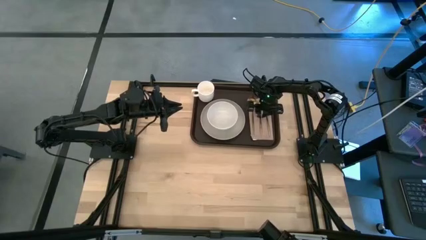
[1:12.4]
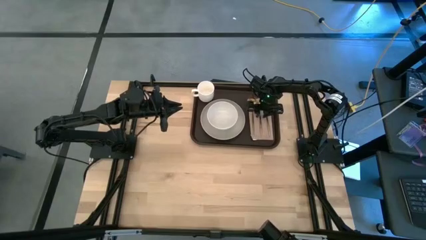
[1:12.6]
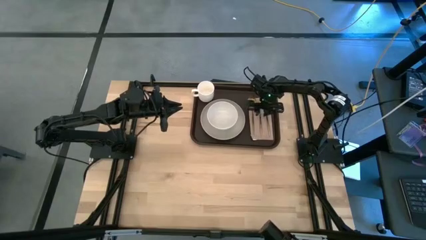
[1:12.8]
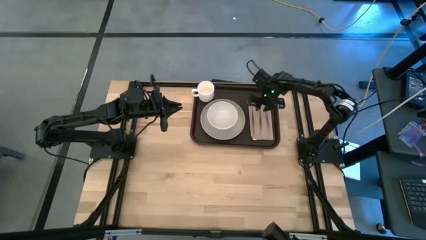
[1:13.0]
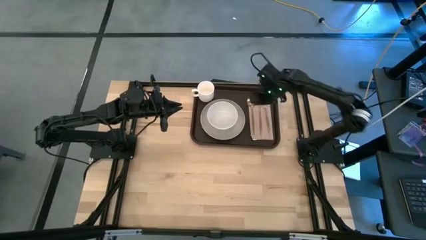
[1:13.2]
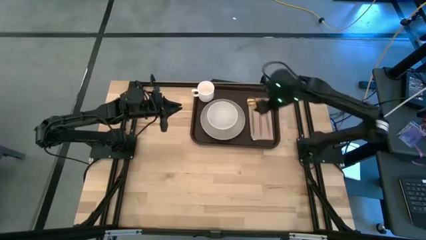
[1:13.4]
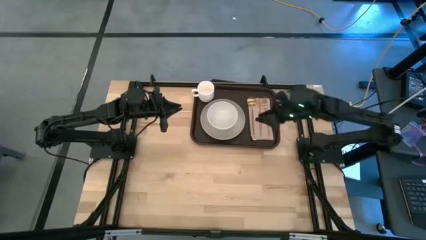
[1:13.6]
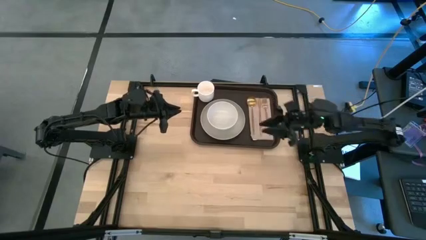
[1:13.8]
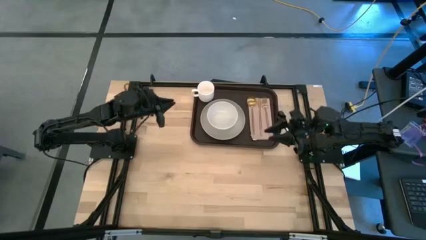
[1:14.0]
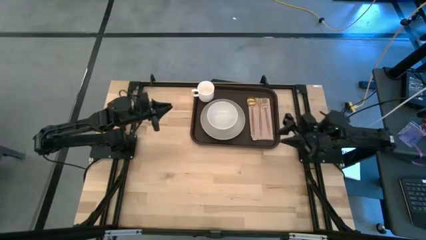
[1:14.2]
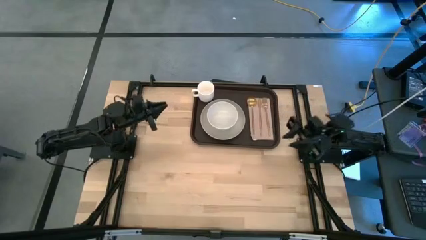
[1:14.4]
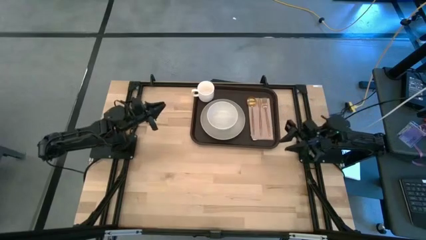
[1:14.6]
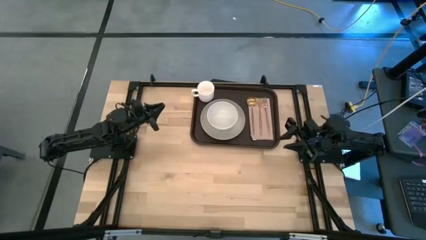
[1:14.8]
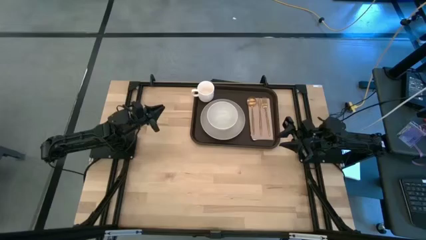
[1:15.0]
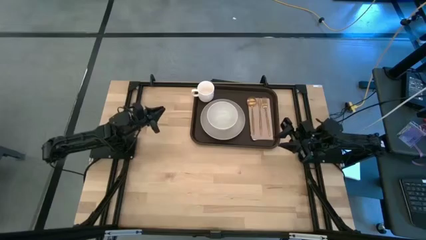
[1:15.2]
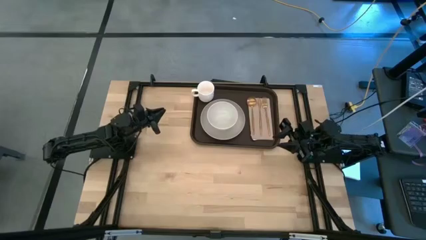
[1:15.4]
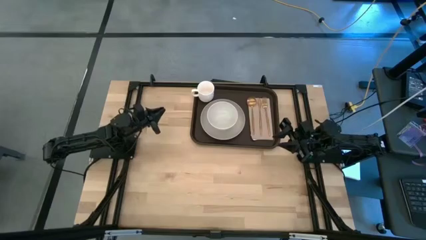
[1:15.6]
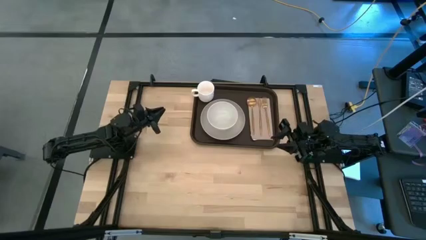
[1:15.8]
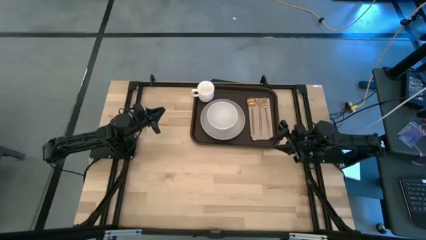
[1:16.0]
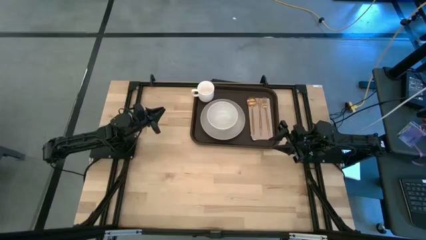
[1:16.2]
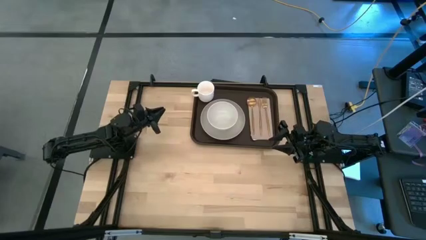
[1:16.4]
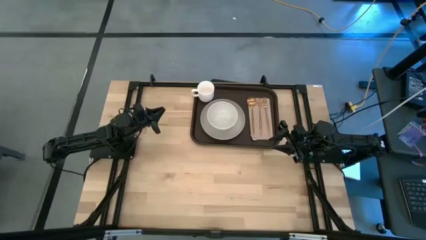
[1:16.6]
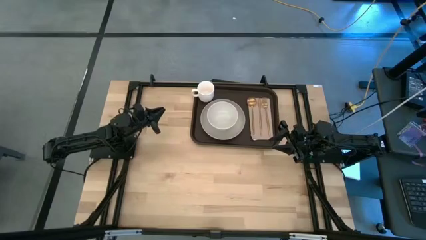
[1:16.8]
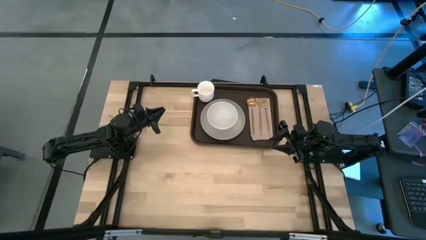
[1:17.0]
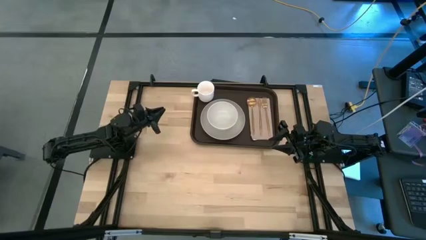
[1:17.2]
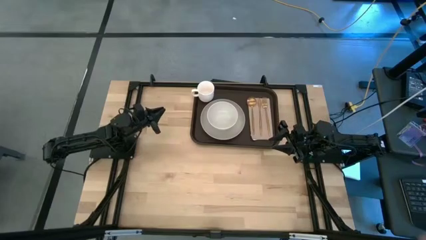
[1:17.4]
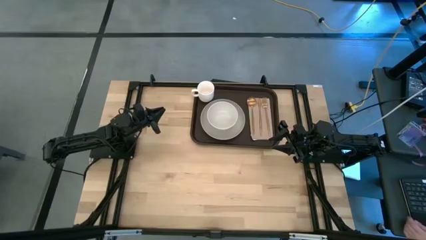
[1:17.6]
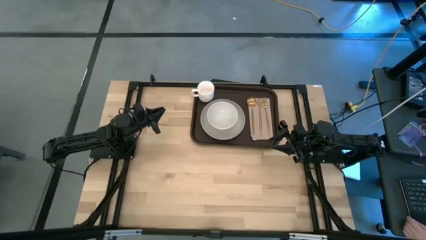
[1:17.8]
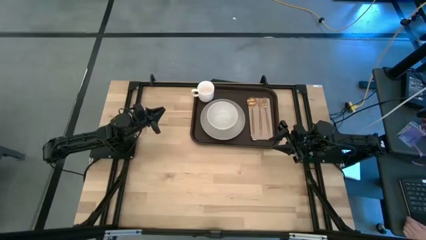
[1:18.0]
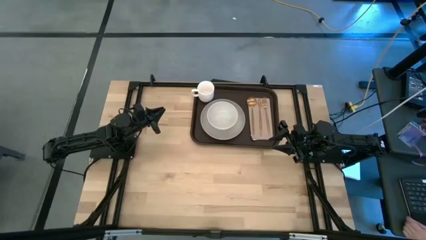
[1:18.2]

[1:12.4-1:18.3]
Task: Set up tray
Return to Home Position

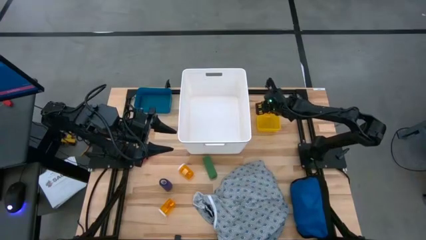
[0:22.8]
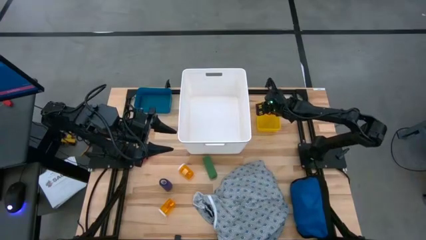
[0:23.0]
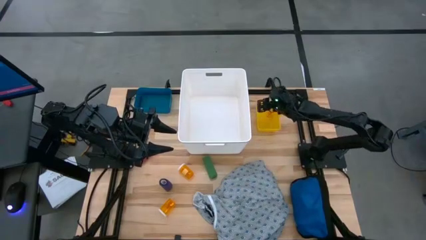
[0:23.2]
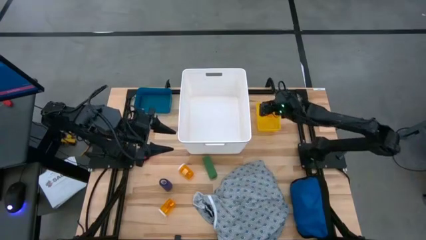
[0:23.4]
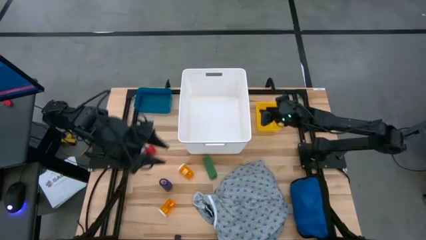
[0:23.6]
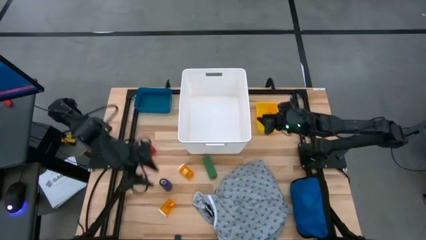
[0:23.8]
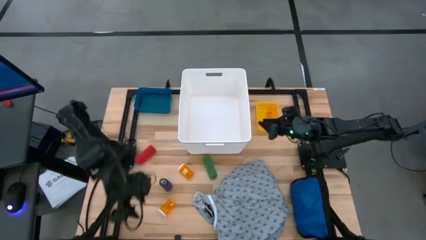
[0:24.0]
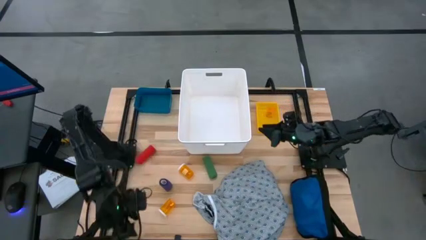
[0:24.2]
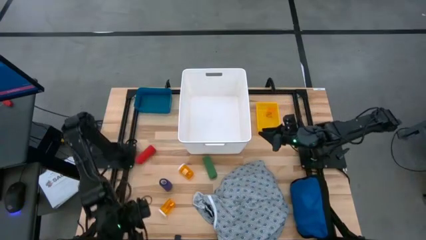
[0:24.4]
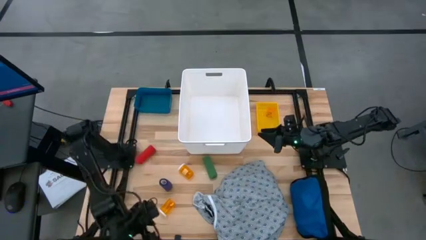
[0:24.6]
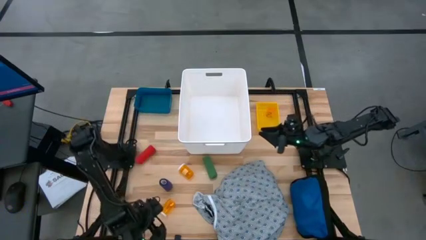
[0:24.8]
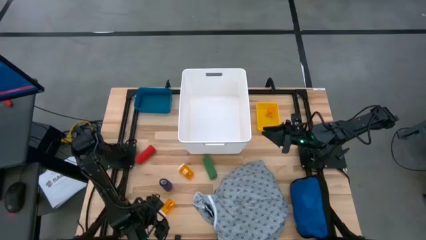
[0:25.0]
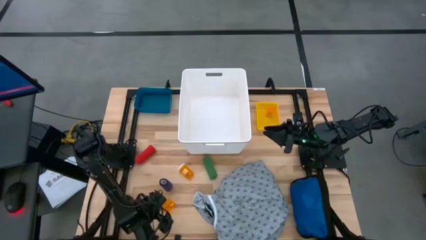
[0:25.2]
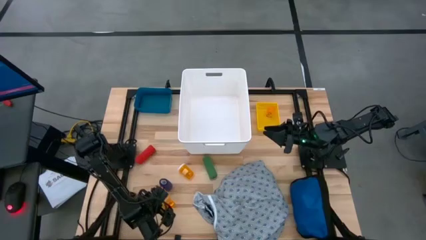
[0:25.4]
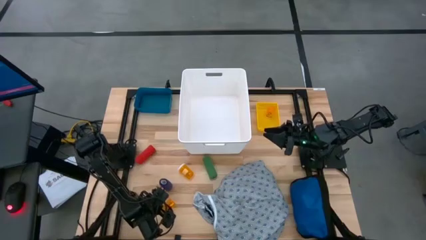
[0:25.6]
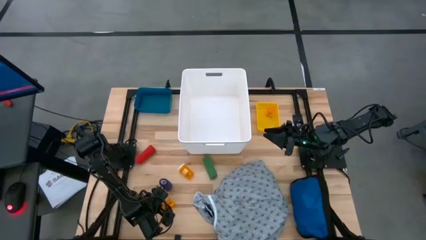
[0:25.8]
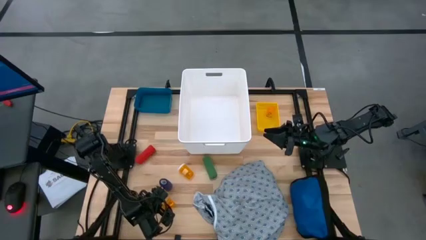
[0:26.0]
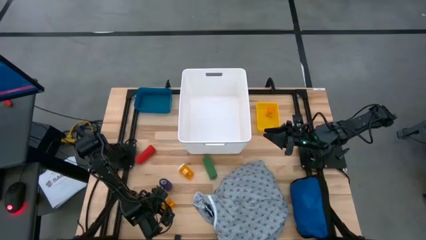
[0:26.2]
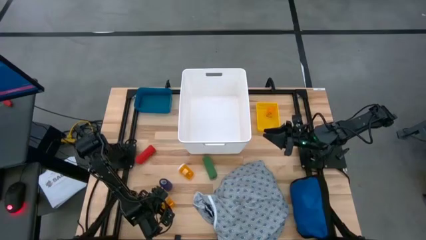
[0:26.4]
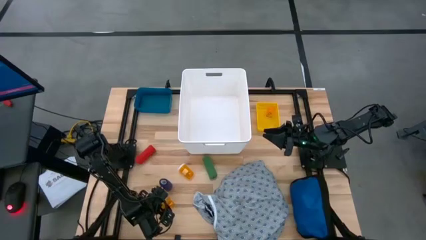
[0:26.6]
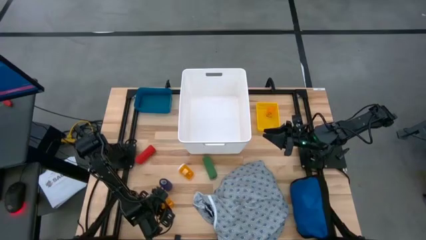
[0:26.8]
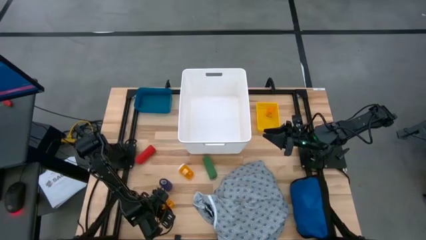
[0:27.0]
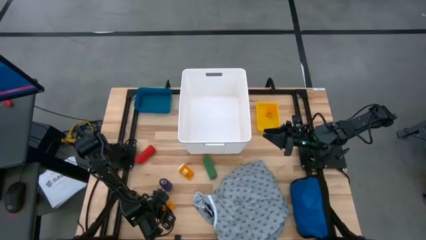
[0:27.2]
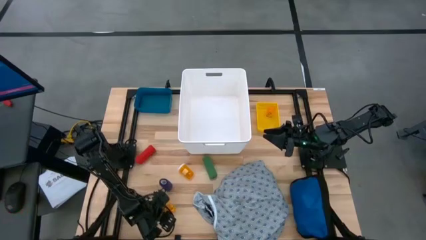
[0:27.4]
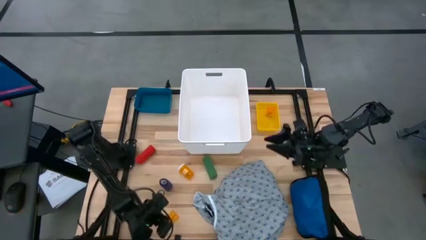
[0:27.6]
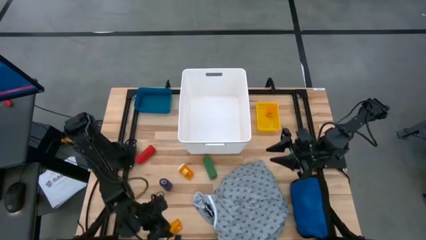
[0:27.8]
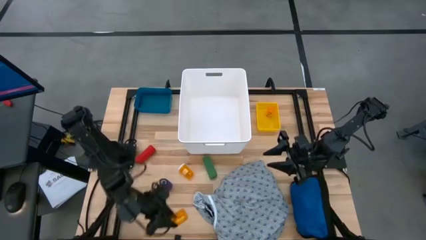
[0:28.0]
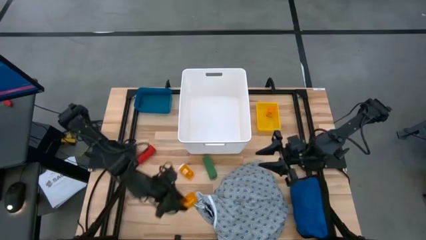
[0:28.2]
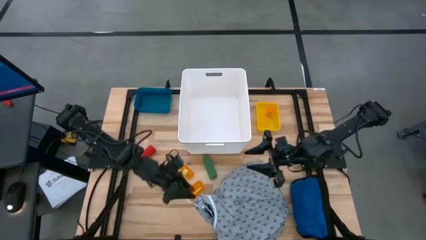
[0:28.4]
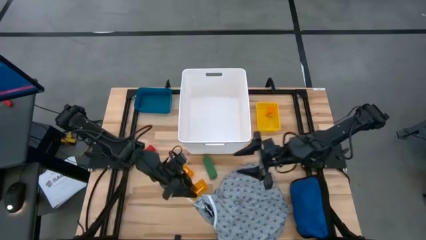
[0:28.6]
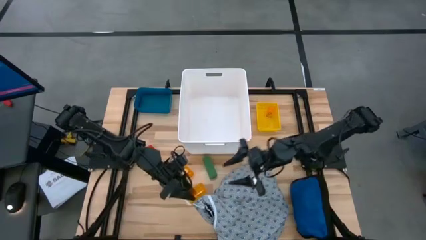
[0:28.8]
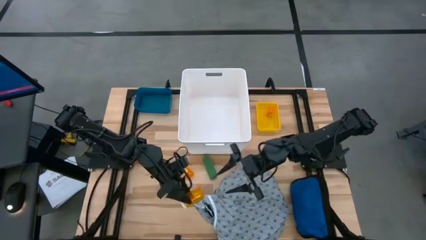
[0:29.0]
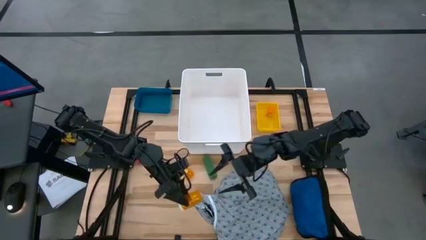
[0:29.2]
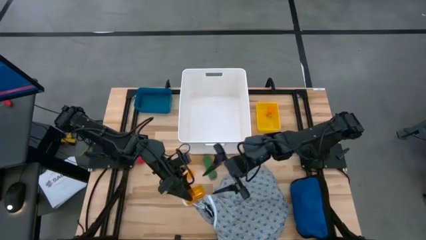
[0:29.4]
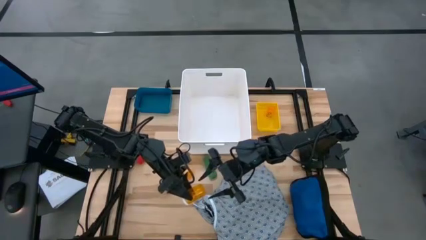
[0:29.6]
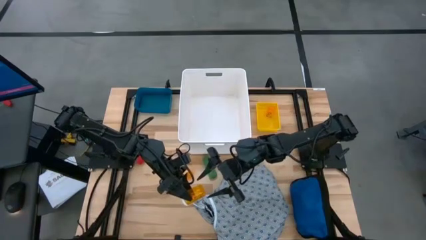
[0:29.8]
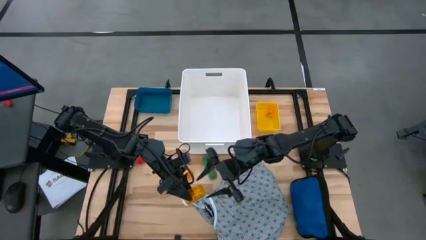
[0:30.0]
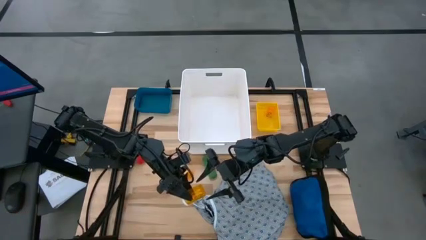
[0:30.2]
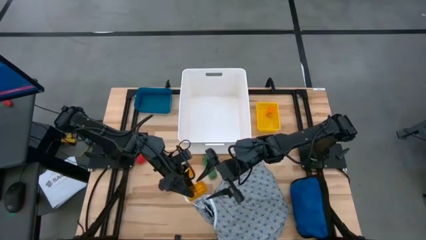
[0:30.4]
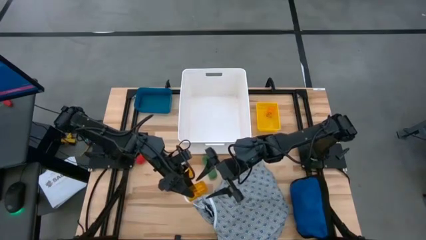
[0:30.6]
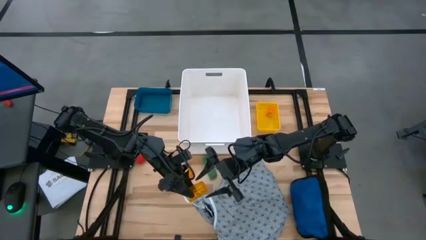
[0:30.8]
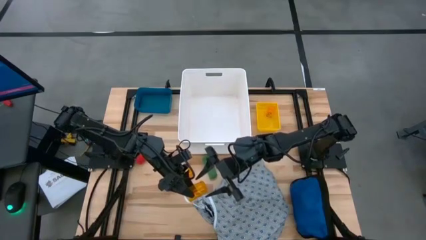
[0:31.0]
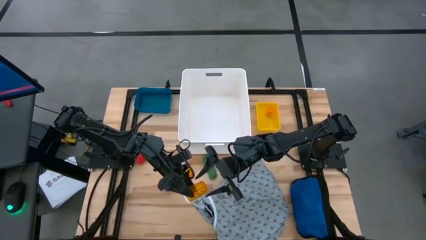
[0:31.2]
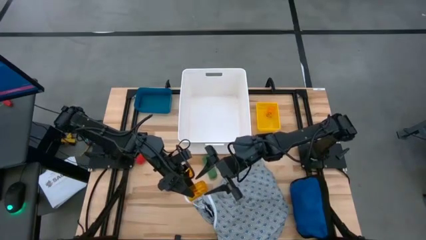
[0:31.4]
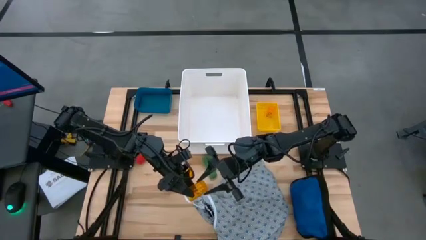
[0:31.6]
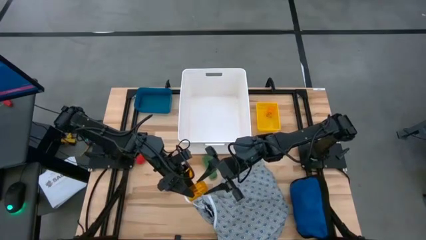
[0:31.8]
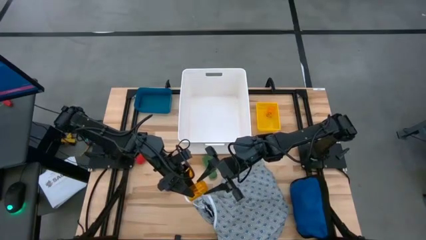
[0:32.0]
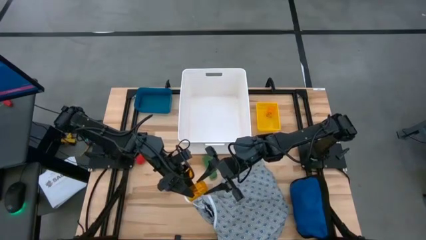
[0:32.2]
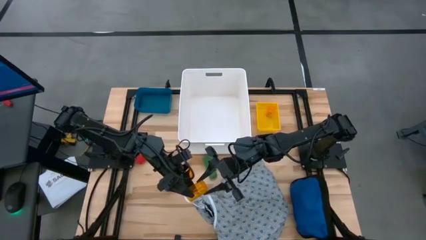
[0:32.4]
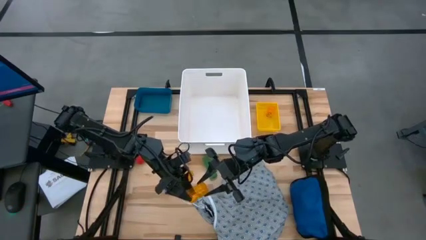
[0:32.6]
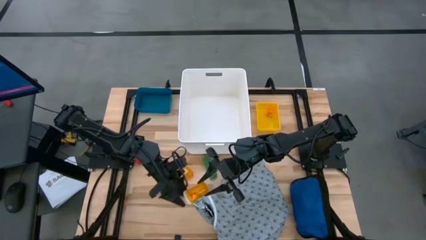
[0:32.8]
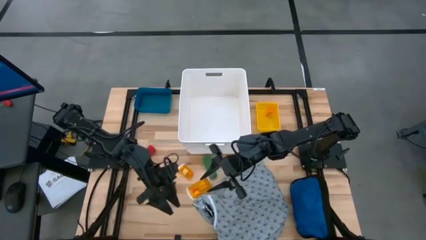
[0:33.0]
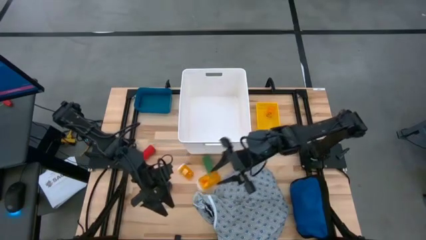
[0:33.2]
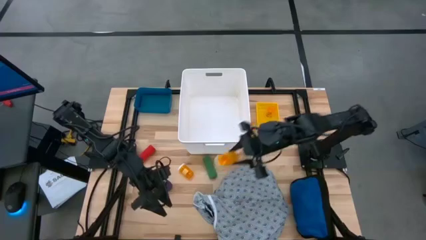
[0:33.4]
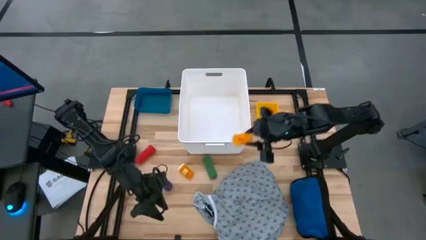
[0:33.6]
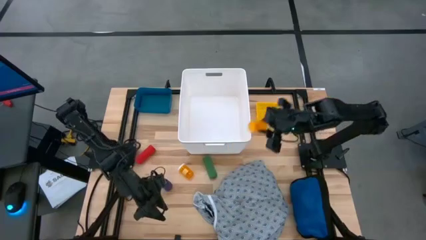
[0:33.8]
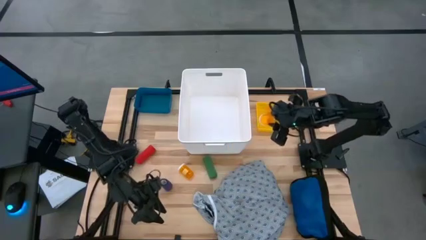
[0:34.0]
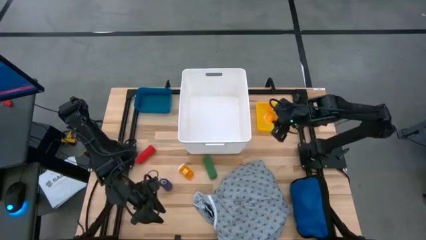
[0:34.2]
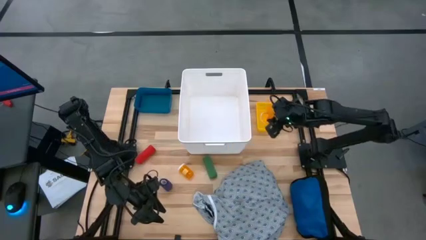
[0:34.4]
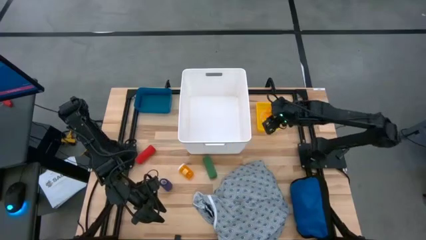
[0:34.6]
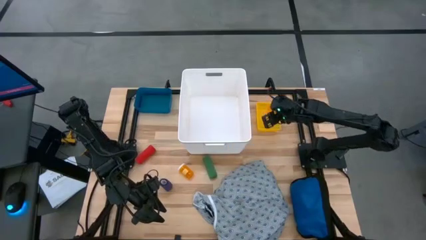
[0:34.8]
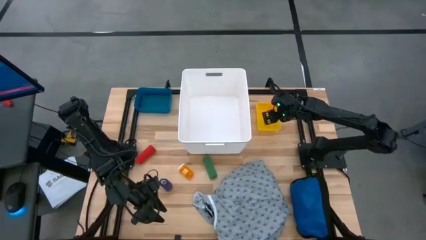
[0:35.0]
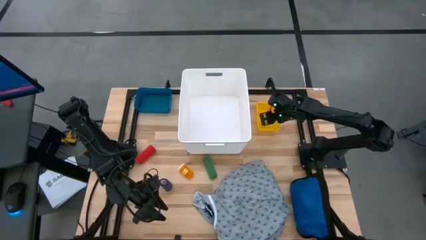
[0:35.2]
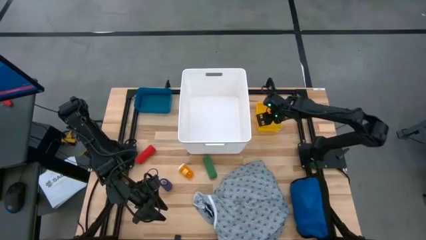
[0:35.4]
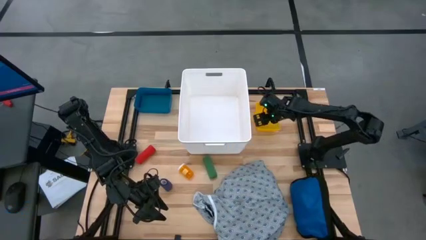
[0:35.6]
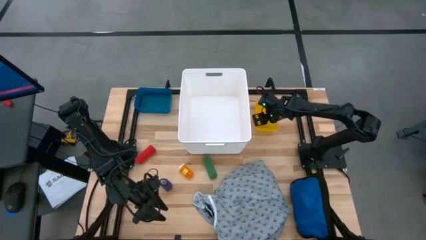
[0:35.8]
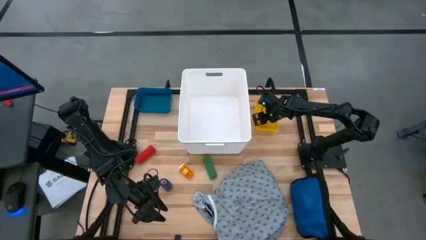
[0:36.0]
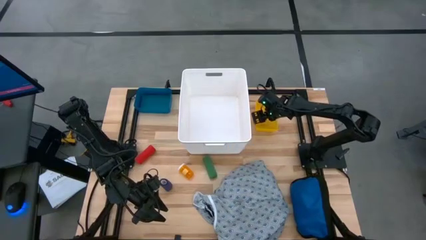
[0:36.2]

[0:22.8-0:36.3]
Task: Pick & place medical supplies in basket/bin
Put the bottom orange pill bottle into the yellow bin
